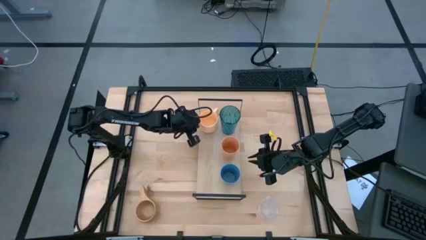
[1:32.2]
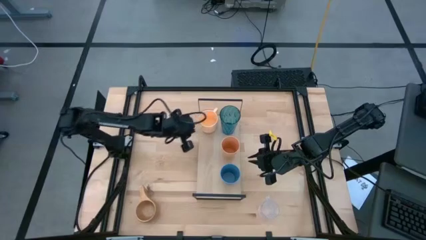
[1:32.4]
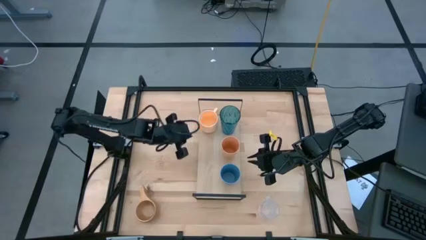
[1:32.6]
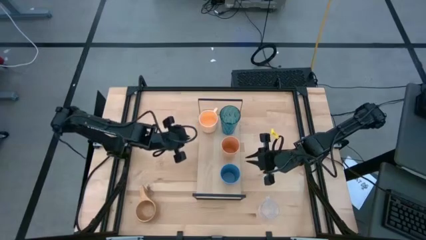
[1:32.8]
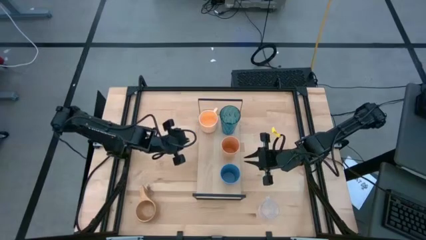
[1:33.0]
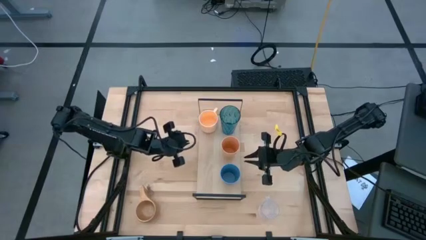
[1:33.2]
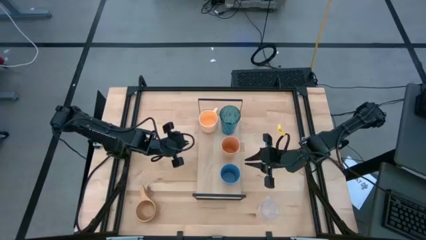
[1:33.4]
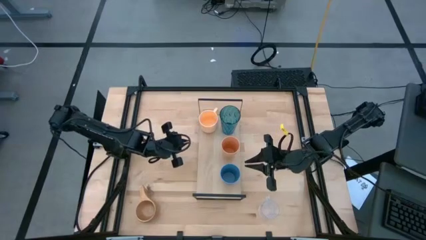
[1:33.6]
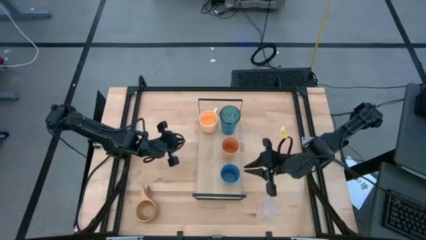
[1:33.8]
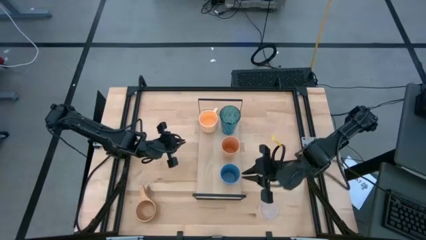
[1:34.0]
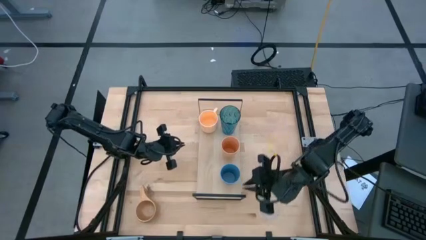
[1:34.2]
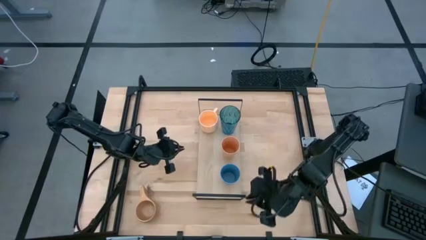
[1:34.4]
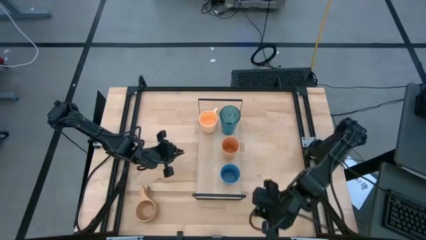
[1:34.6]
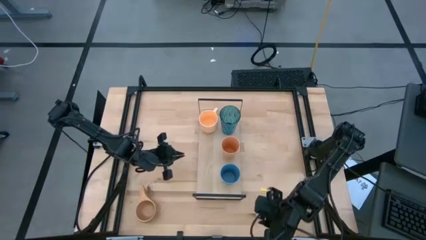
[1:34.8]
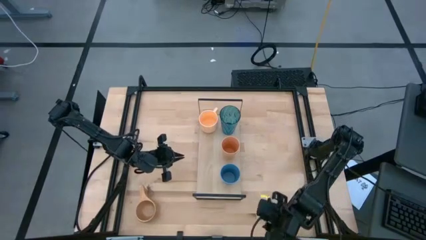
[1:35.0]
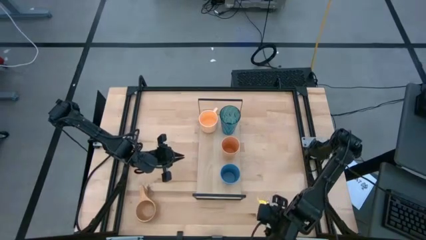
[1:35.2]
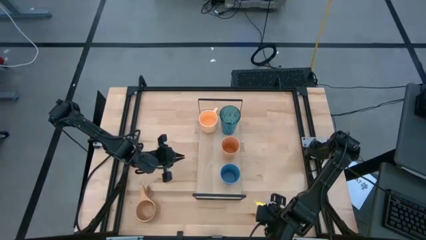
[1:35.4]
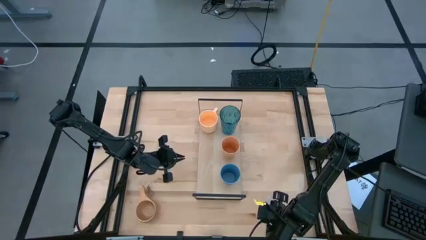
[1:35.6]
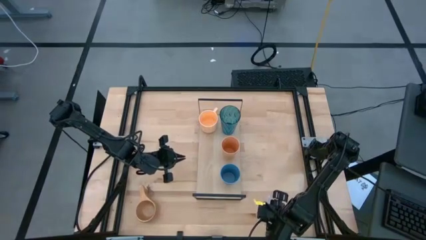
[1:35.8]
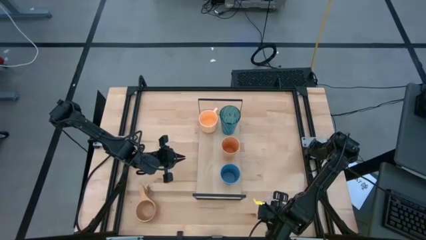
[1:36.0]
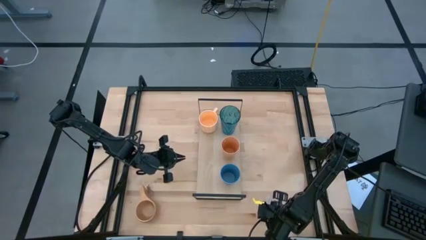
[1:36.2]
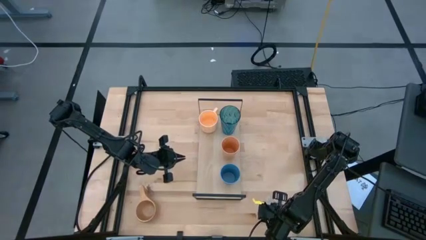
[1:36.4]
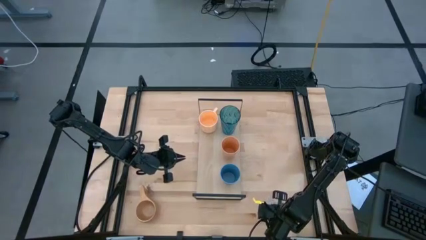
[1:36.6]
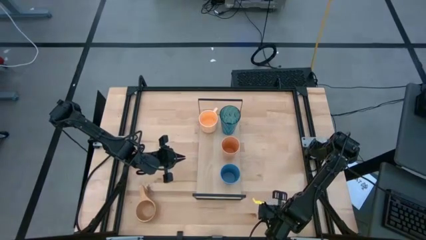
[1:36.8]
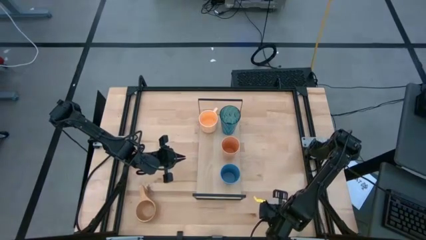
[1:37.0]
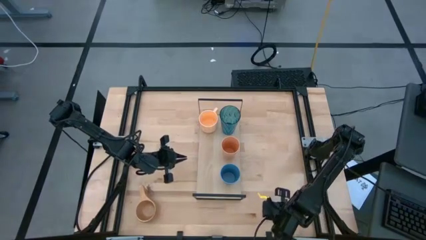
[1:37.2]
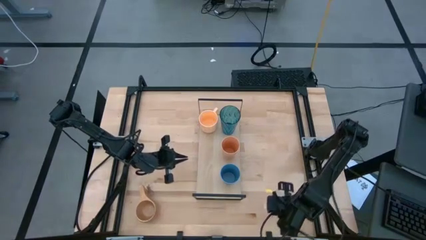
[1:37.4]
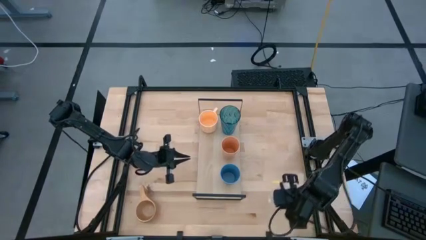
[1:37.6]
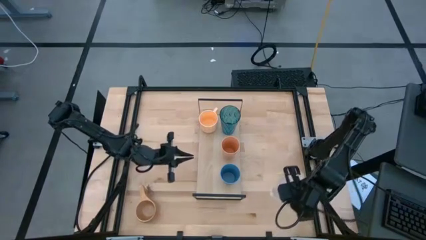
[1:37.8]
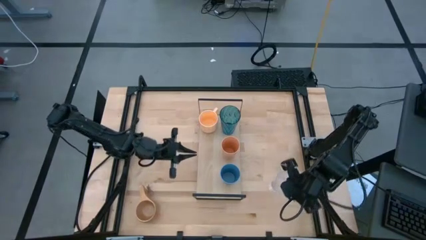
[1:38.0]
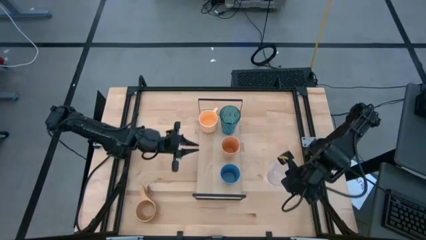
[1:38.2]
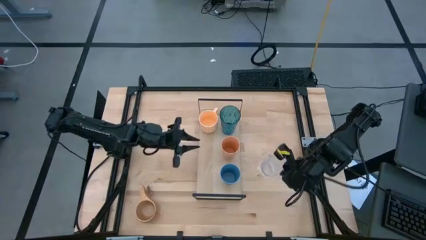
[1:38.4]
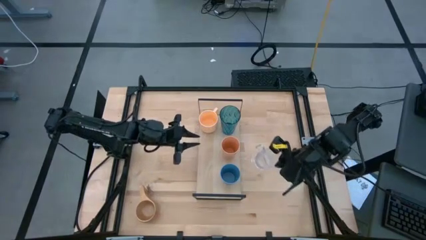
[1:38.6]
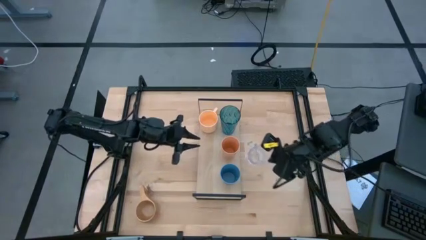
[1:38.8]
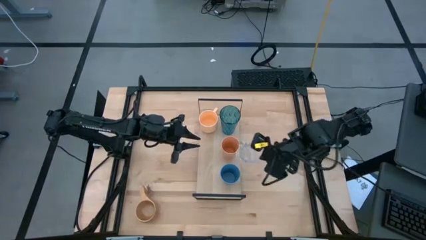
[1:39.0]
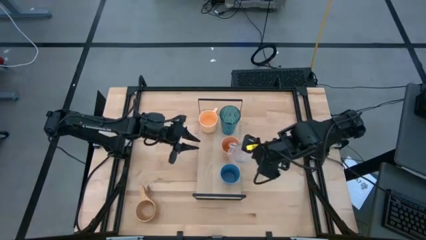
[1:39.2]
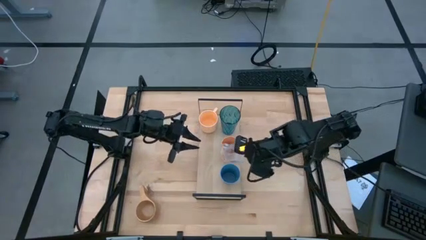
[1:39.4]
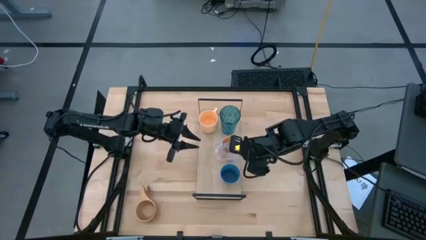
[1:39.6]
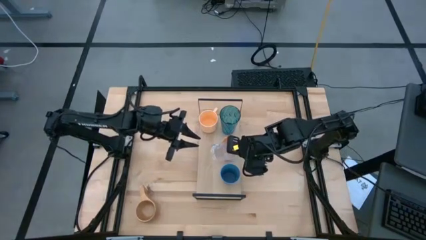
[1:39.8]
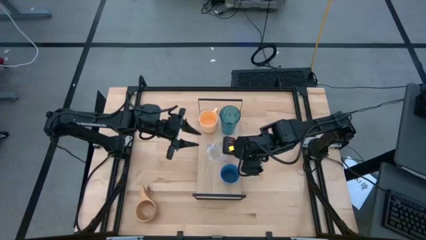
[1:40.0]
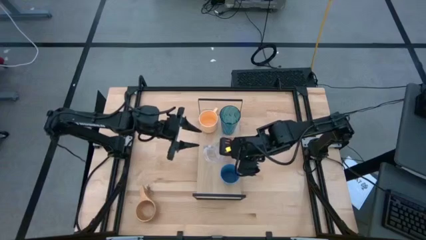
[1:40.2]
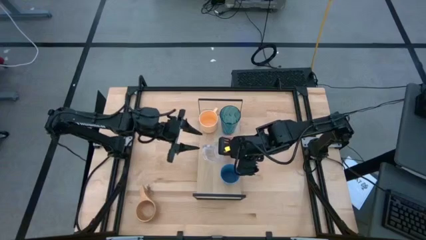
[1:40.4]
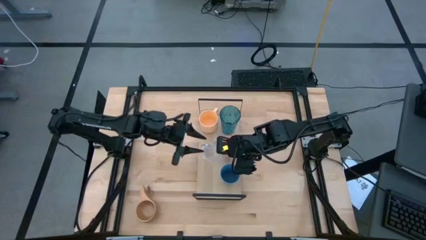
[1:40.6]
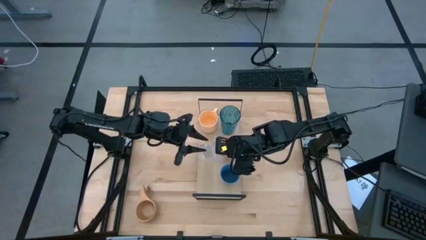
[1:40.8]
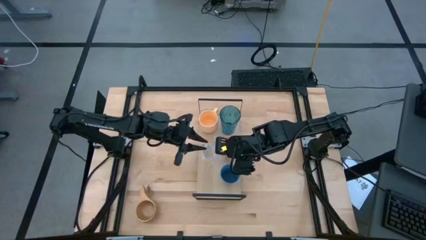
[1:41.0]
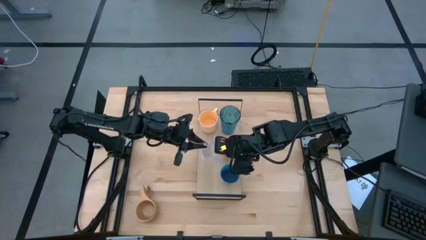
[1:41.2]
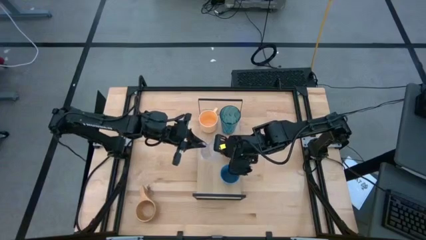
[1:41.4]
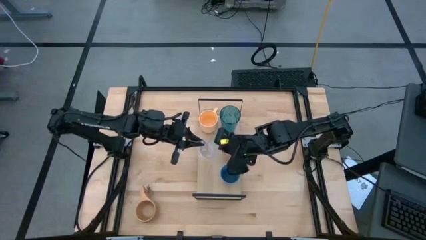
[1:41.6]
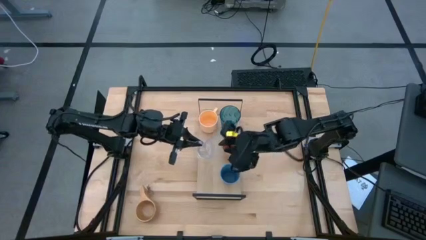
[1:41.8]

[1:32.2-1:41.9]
Task: Stack small to large cups/mugs on shelf
Put the transparent mug on the shelf

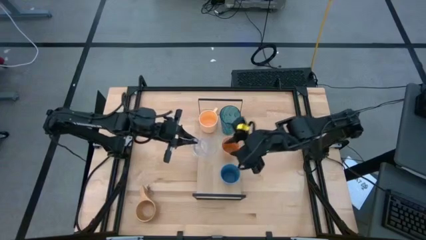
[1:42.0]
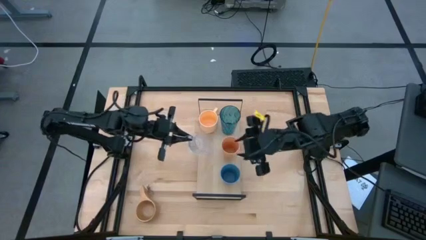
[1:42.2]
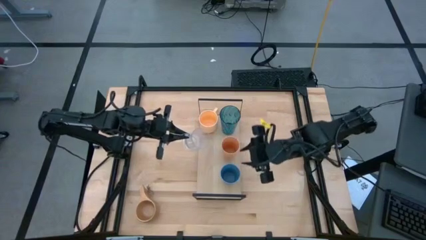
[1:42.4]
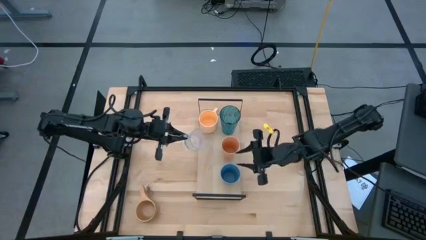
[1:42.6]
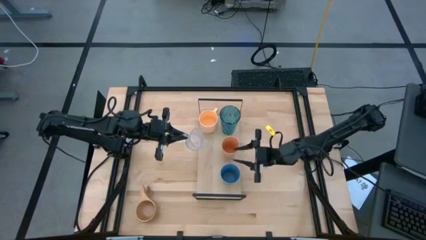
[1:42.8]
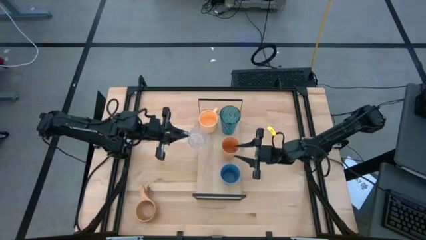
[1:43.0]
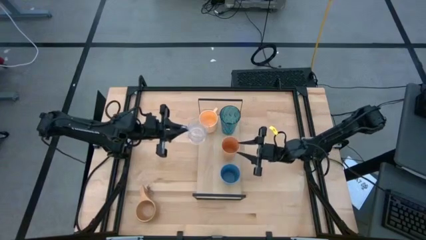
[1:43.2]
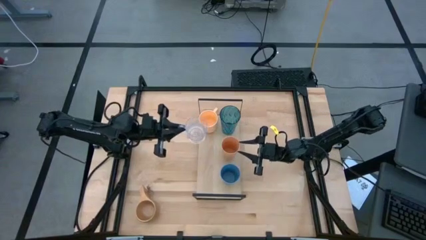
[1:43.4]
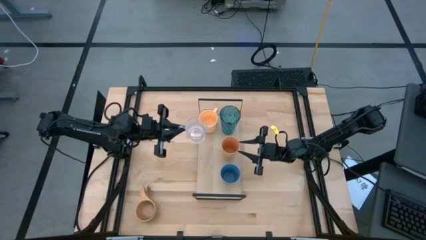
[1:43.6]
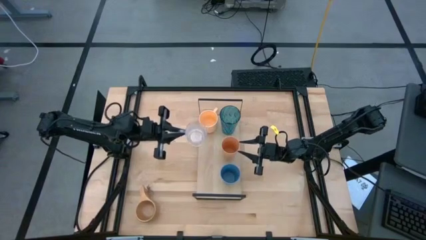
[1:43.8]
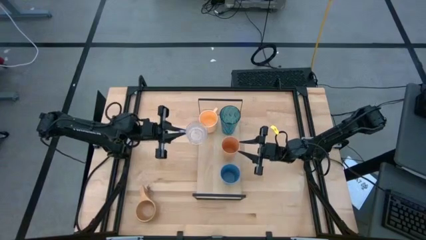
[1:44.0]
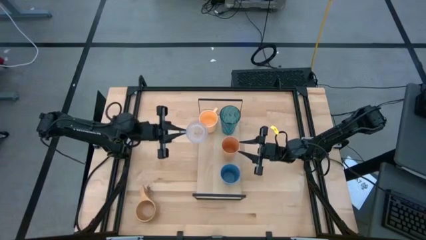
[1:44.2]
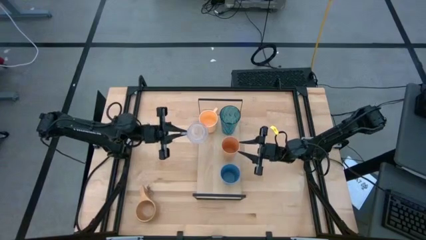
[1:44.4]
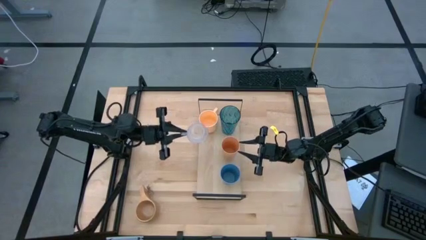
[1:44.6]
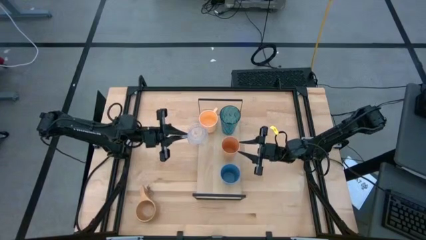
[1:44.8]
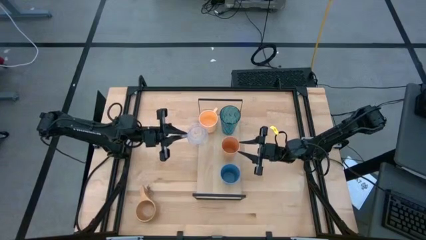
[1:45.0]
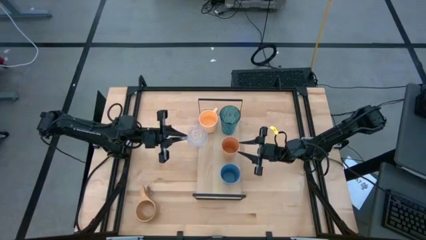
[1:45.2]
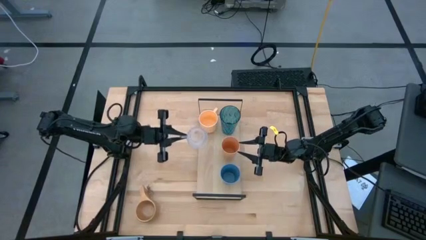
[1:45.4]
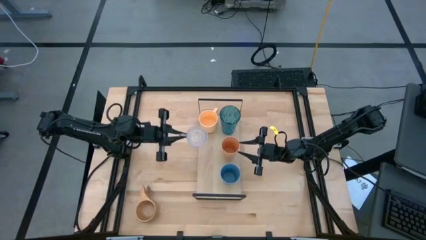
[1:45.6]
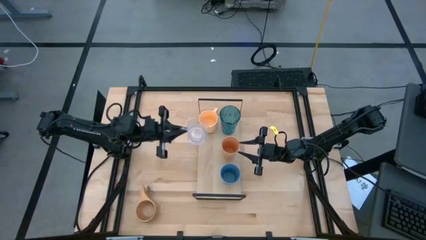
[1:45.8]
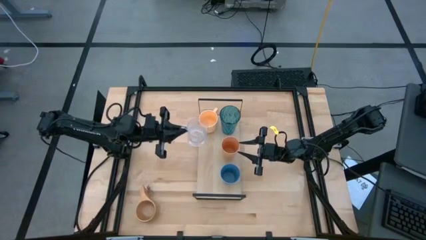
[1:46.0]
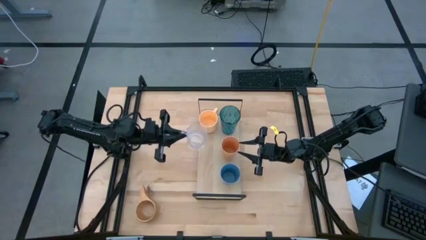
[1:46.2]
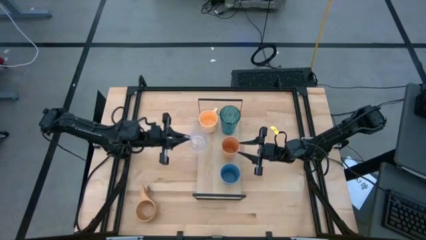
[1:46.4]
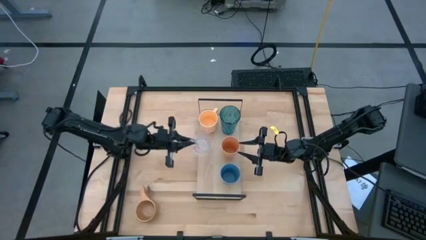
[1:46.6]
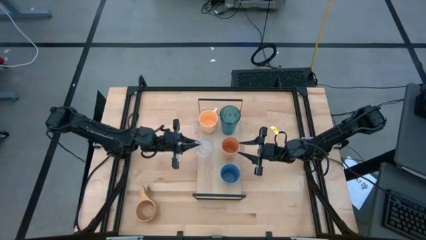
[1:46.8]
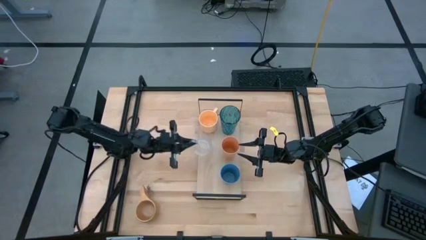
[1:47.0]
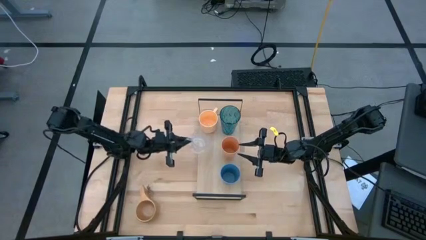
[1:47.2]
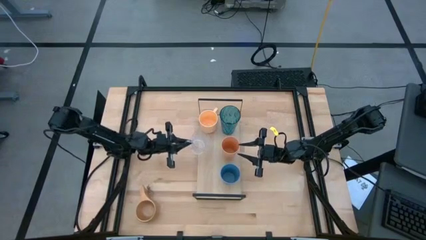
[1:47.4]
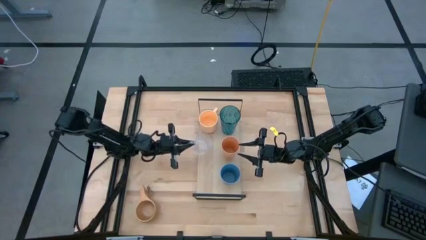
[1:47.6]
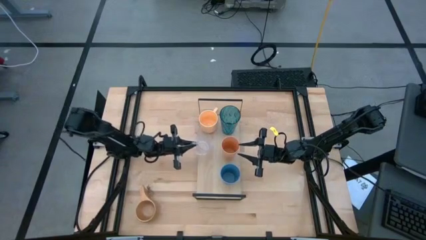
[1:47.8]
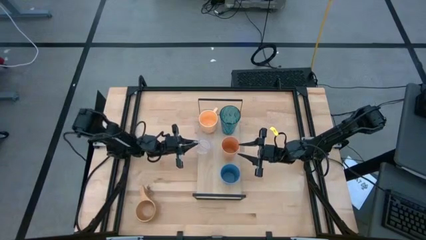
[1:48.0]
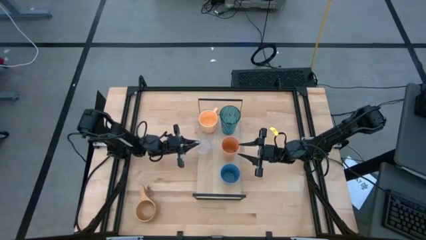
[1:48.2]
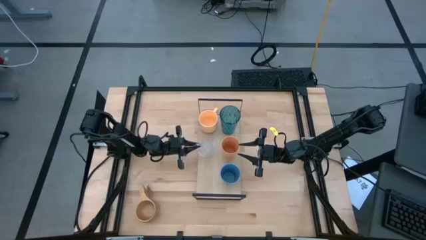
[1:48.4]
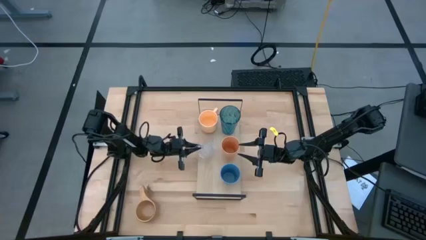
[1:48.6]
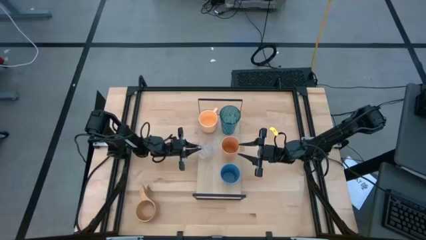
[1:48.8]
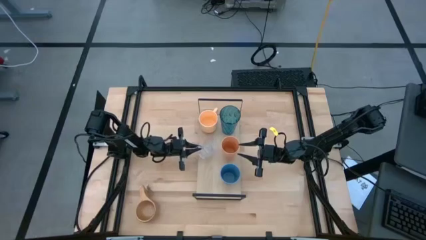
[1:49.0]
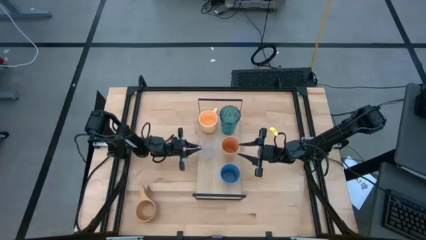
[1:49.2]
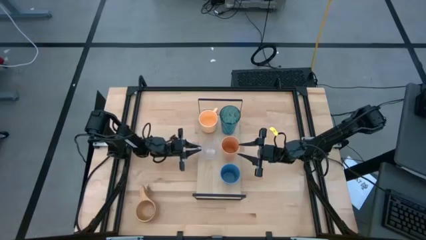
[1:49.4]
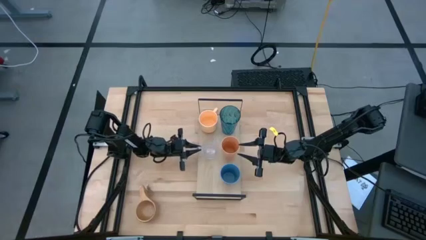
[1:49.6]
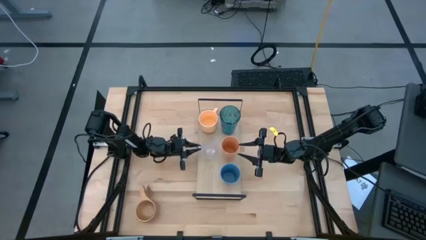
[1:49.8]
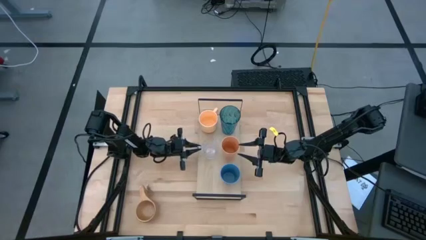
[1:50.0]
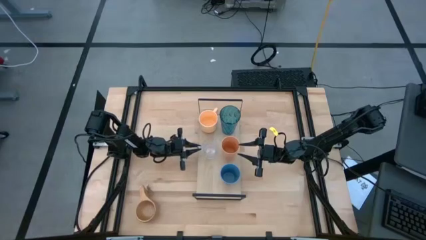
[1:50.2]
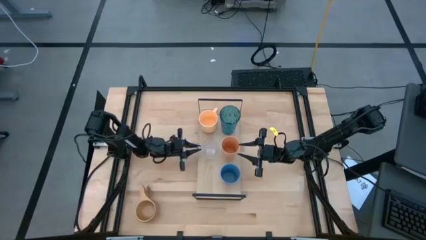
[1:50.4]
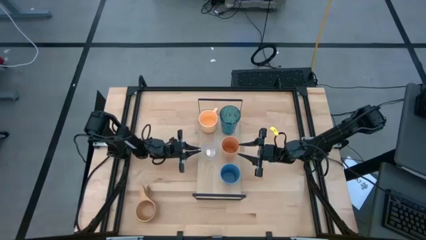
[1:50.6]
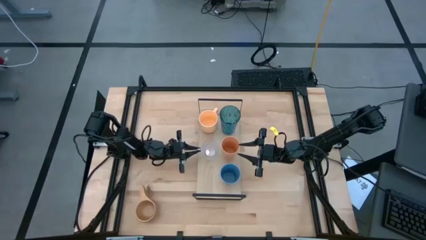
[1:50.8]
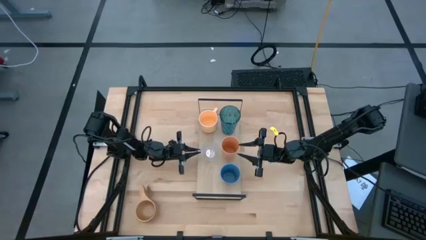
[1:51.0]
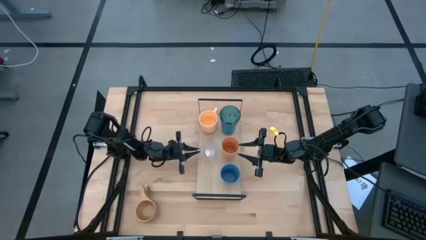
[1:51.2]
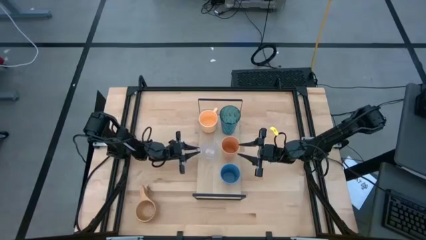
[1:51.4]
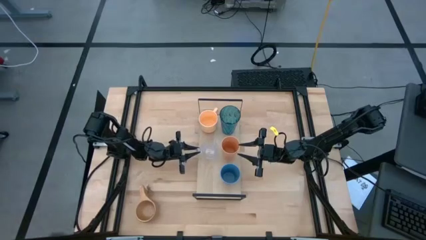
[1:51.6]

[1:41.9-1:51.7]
Put the transparent mug on the shelf
